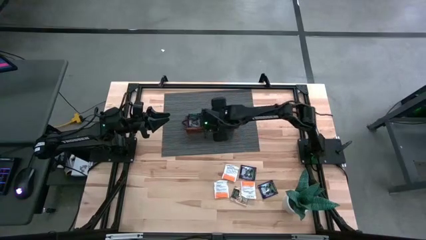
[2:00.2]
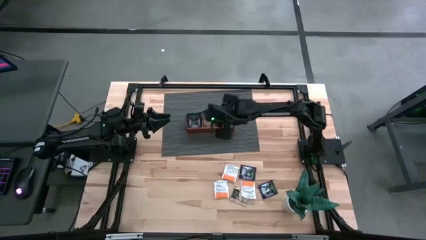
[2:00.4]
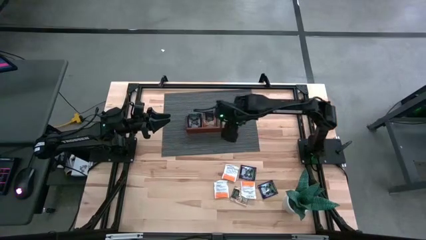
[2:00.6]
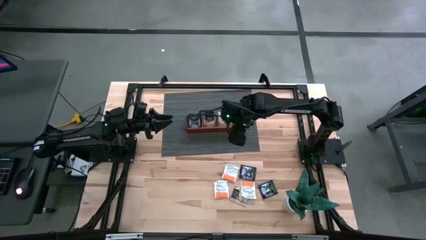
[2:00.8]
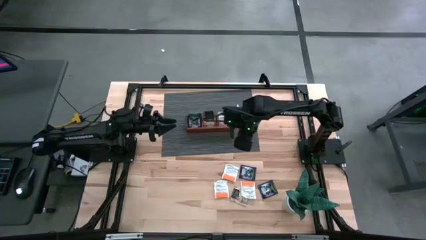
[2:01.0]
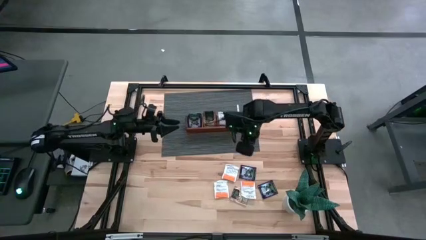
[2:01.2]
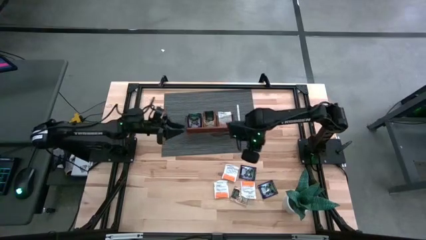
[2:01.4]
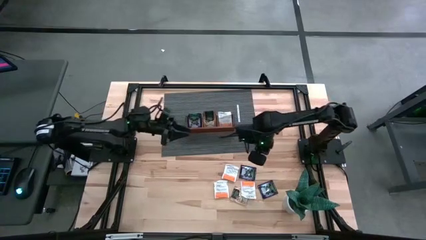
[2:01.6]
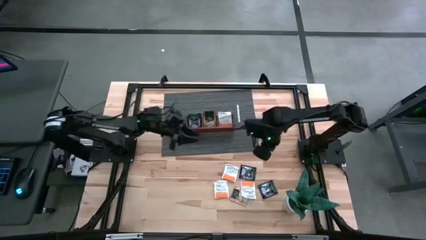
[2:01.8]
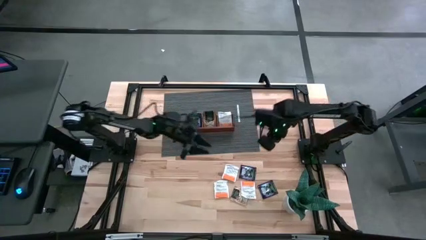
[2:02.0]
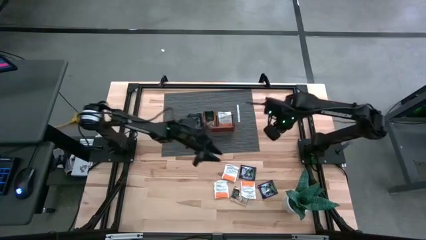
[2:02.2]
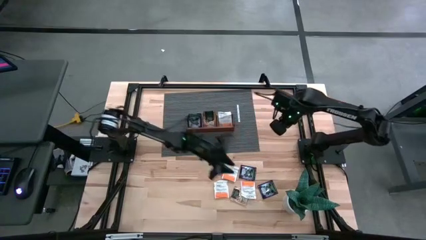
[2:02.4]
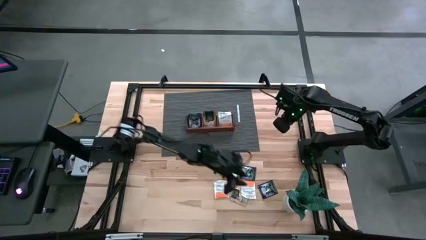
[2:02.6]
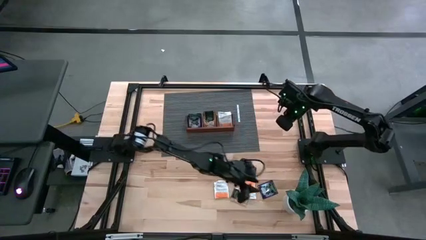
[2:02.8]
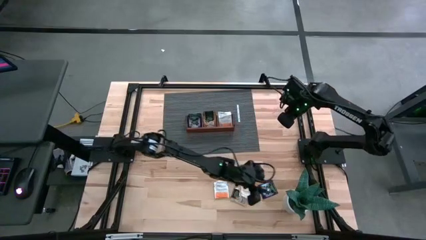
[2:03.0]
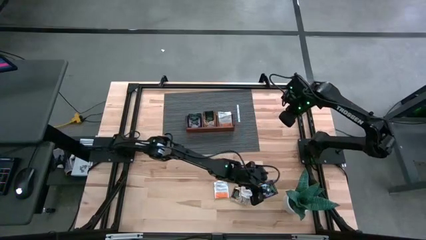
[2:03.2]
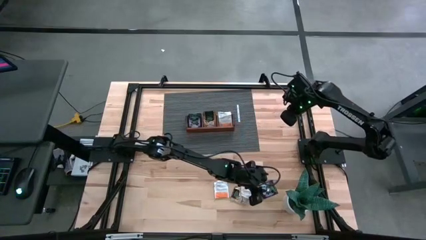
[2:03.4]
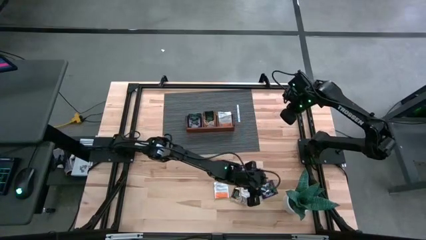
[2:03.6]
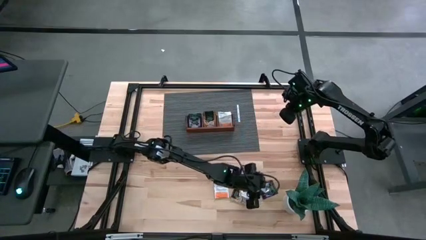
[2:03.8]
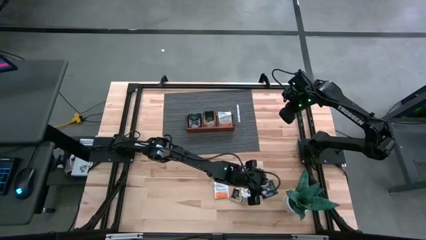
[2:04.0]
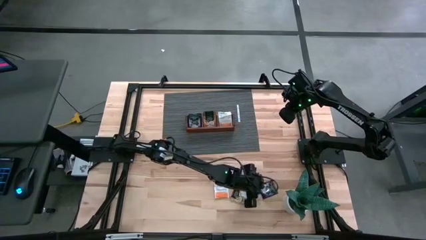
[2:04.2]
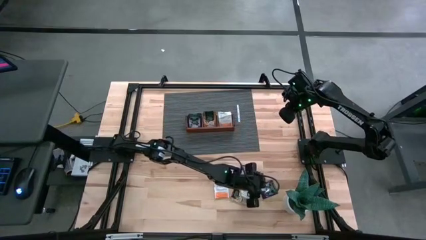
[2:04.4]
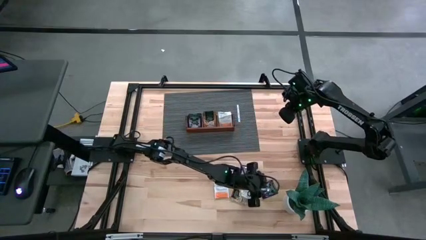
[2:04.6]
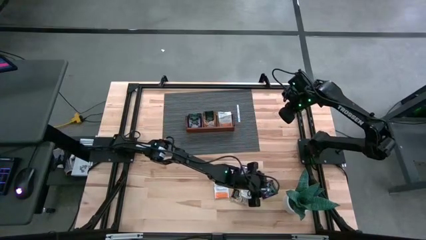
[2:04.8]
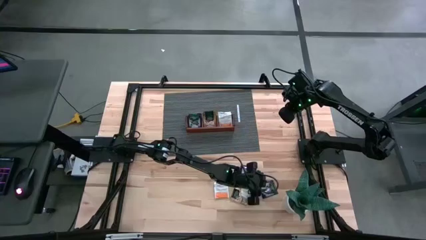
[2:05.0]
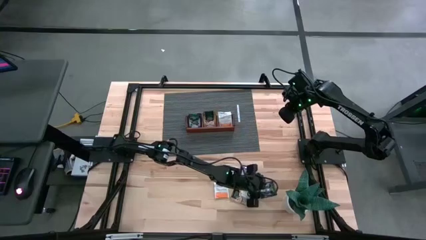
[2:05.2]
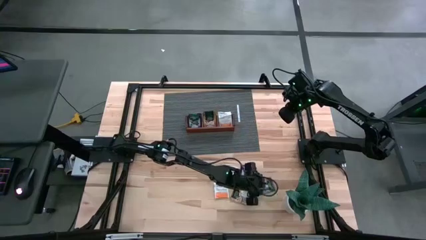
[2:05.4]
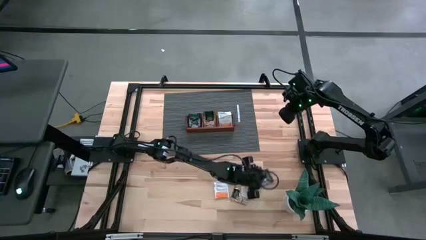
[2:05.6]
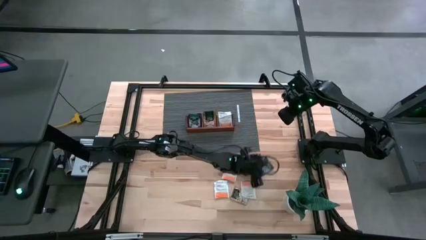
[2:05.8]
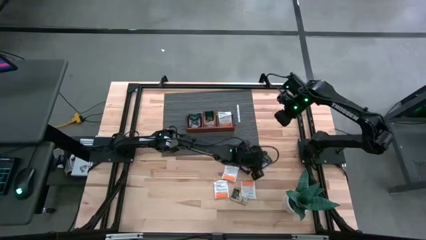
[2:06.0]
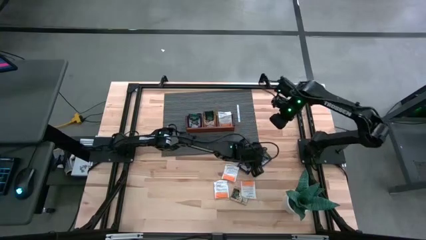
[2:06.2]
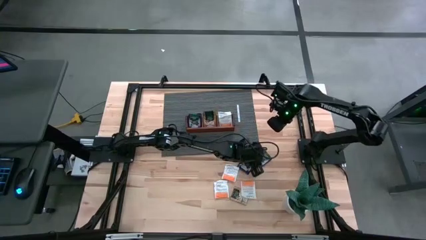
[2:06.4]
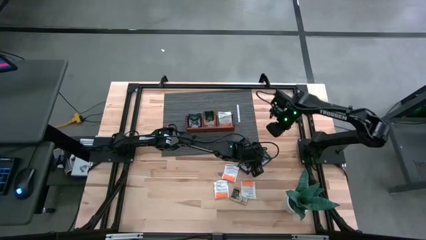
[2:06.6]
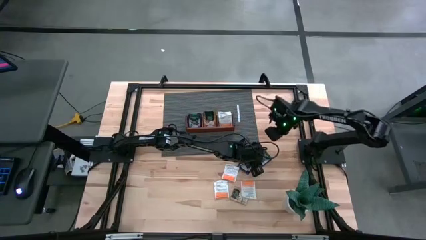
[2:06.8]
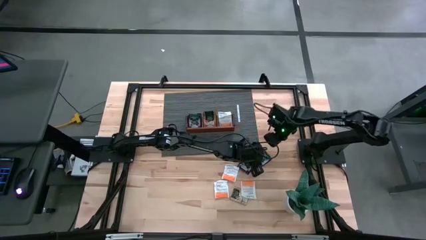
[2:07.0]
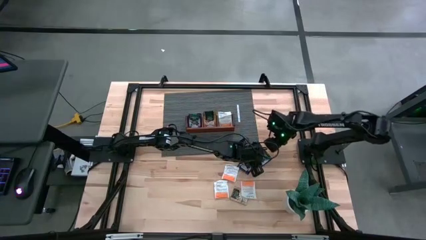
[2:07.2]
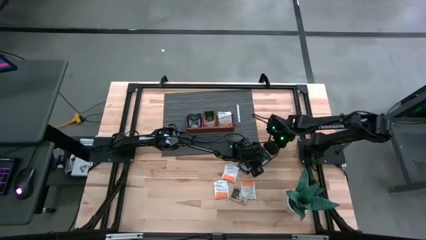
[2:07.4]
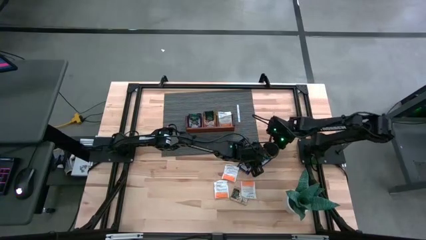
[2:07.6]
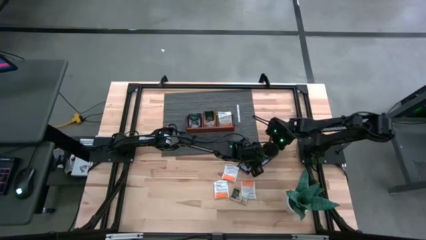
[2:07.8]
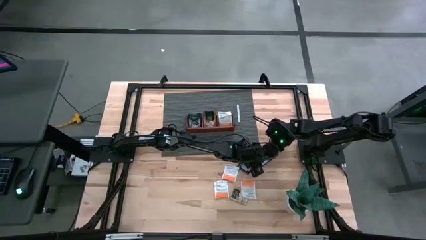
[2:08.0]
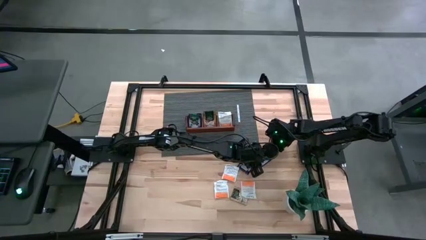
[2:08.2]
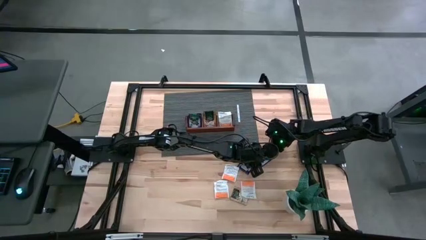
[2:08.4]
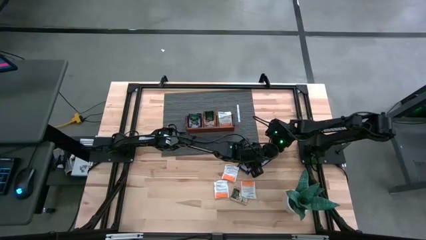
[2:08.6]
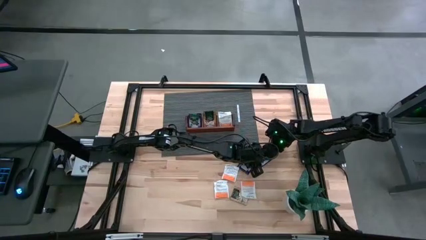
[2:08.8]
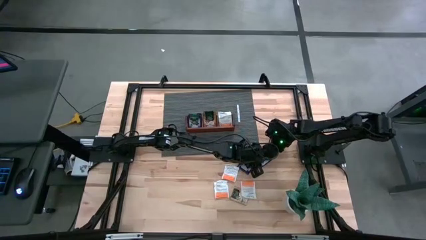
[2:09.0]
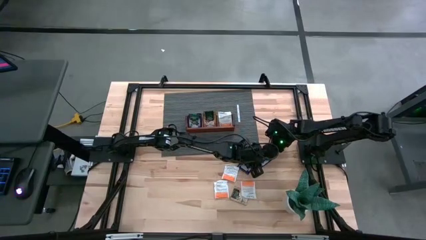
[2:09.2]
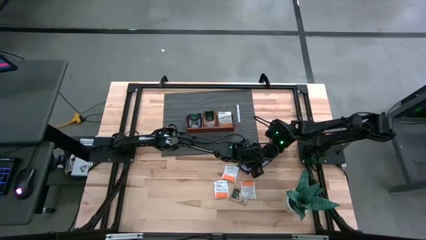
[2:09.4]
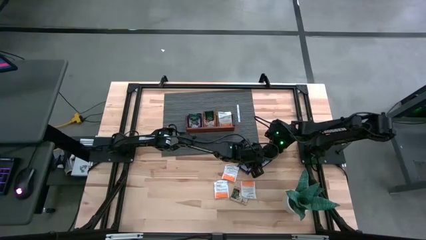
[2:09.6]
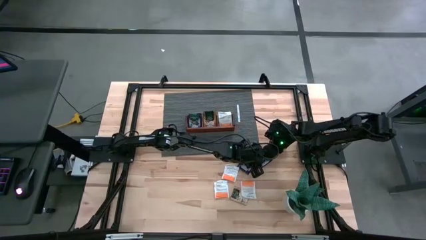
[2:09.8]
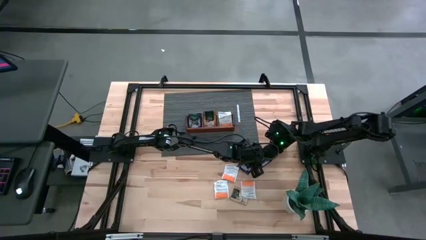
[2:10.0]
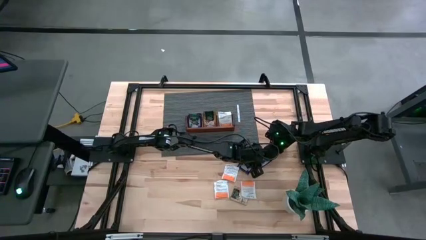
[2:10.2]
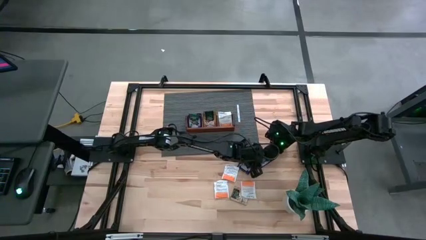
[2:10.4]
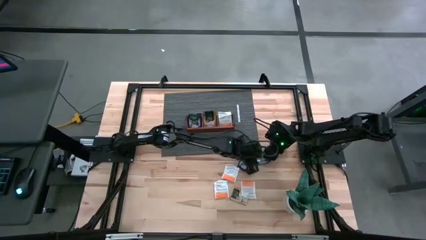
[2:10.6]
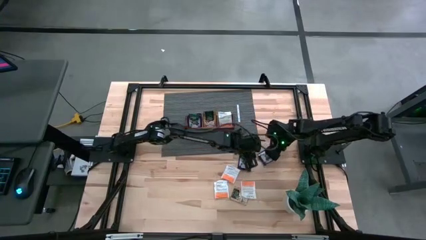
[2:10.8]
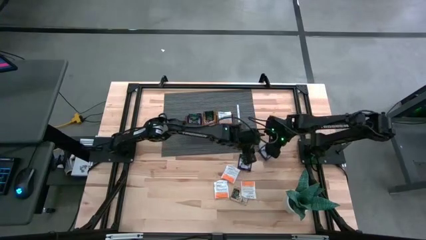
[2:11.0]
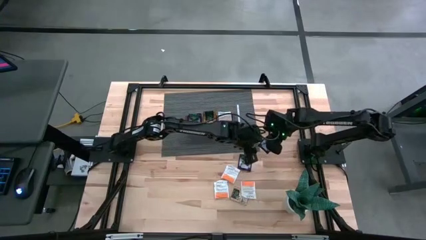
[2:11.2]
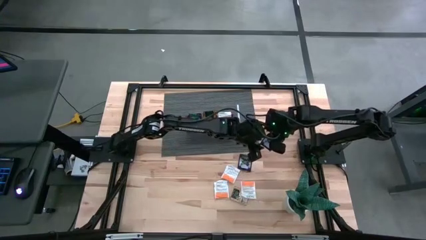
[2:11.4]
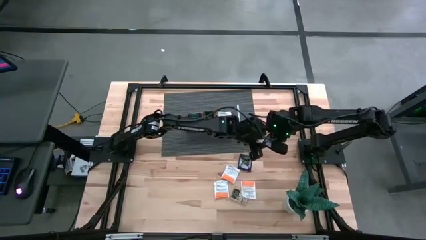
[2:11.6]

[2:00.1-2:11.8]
Task: Pick & Place Tea
Put the violet tea bag into the left section of the wooden organizer

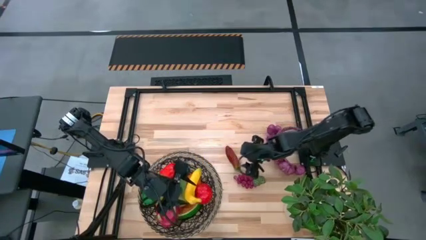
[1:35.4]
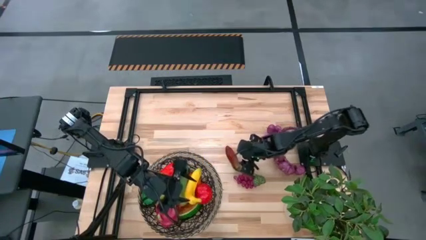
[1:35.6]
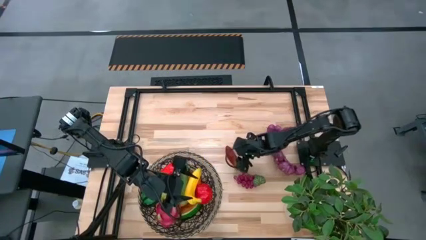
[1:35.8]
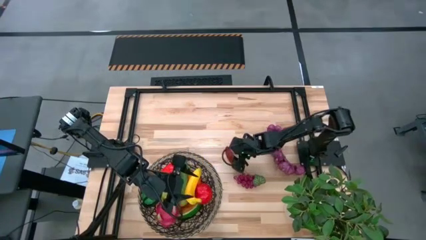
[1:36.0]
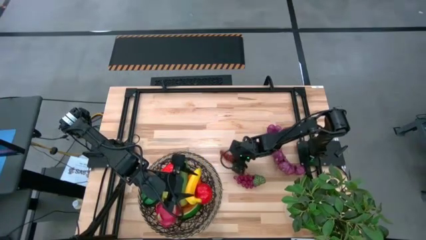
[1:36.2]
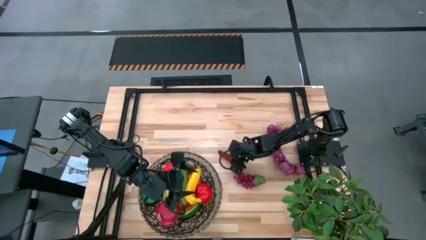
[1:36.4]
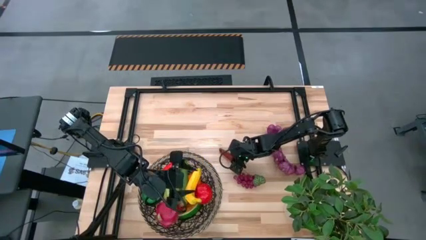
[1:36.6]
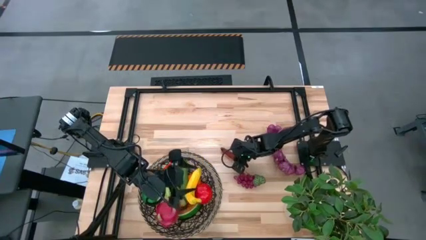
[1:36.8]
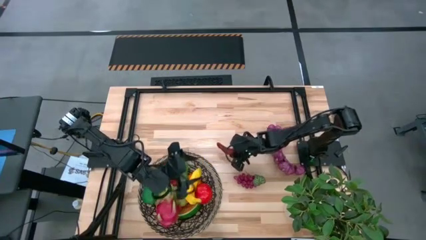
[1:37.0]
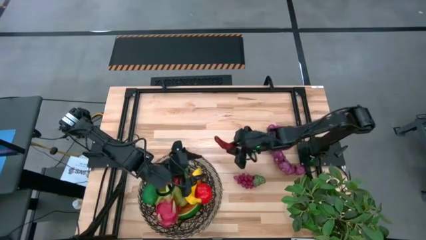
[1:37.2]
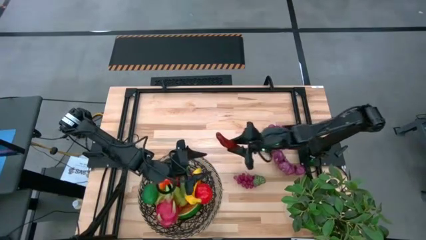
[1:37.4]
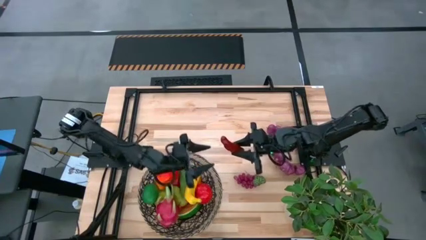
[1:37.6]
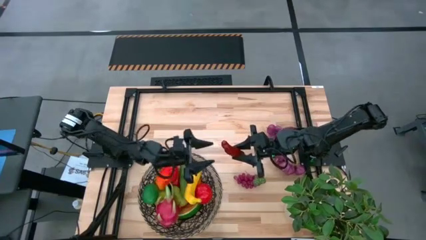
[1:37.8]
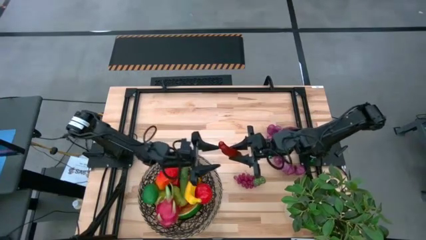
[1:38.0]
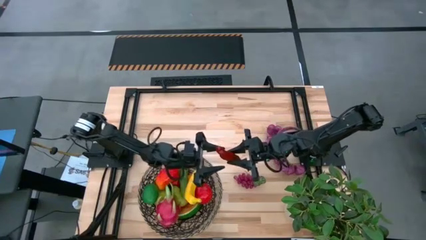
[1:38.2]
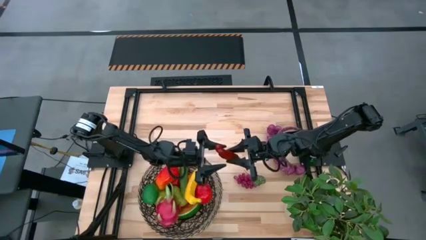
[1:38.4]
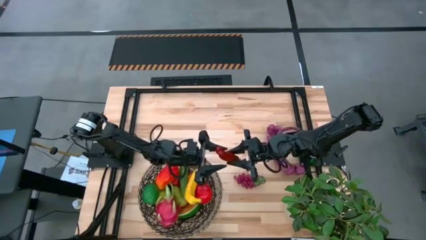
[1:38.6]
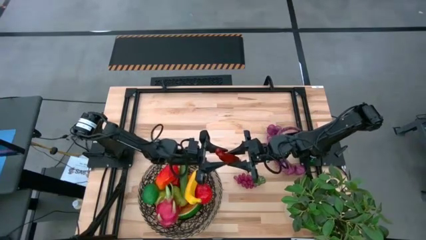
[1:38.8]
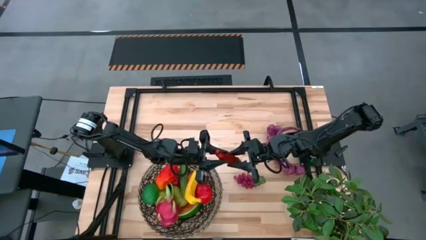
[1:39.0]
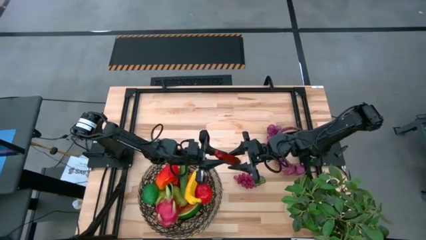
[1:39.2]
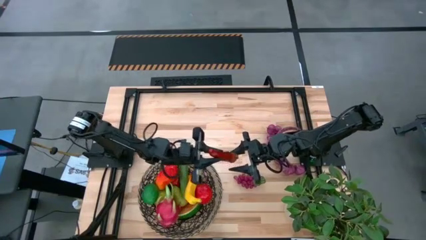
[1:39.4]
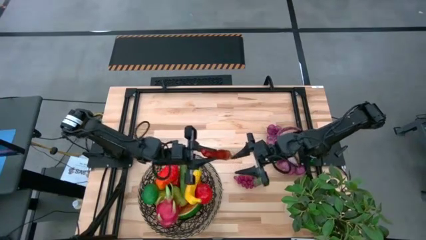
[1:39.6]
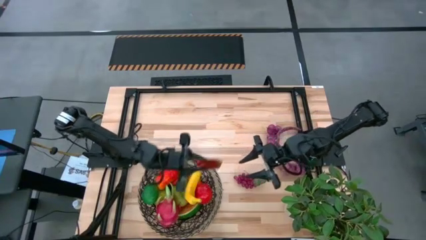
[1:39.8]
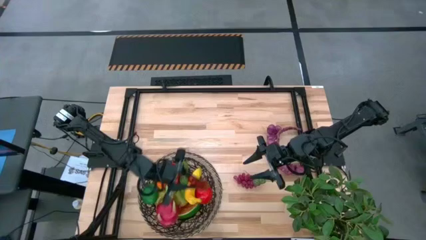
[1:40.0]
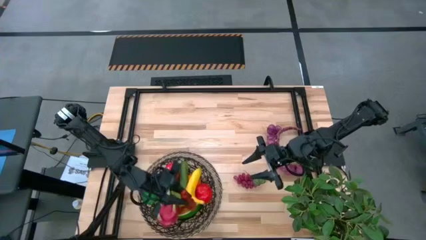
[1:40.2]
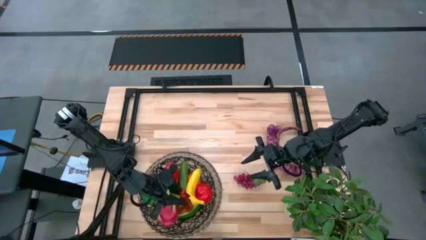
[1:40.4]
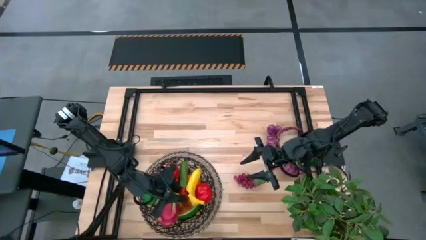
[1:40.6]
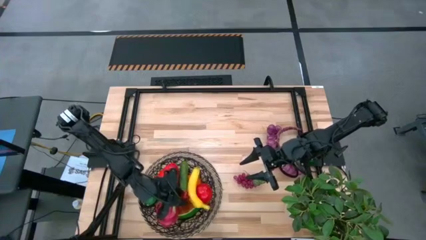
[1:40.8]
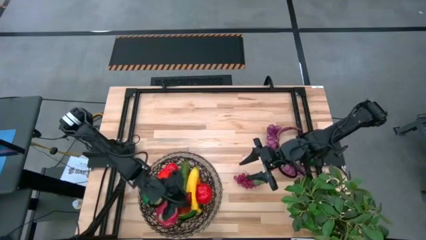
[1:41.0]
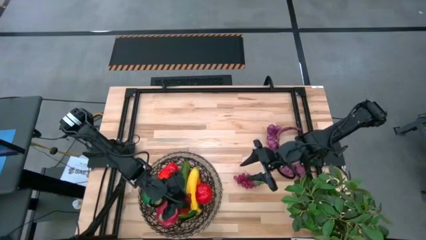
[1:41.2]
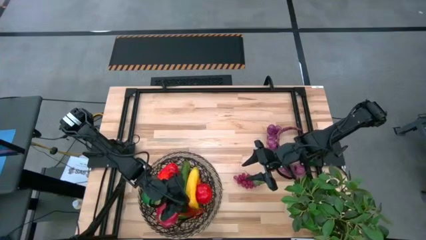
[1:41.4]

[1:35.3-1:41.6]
Task: Build produce basket
Put the chili pepper into the woven basket
